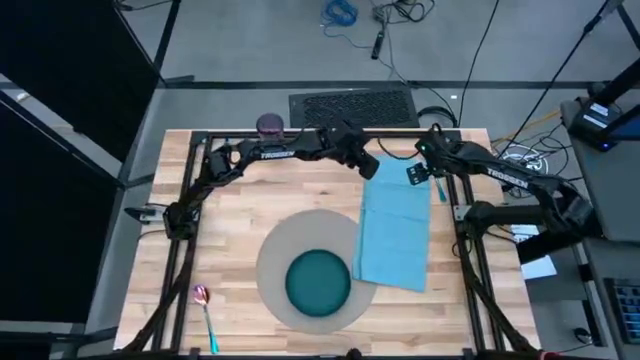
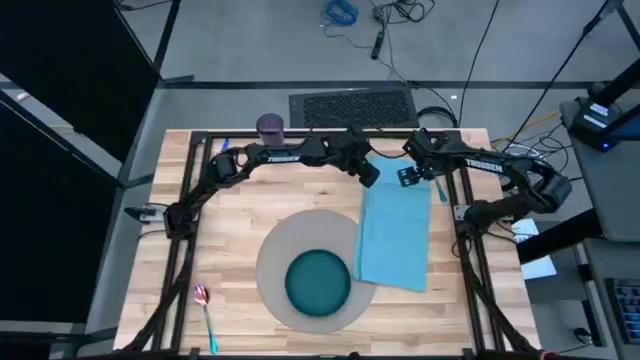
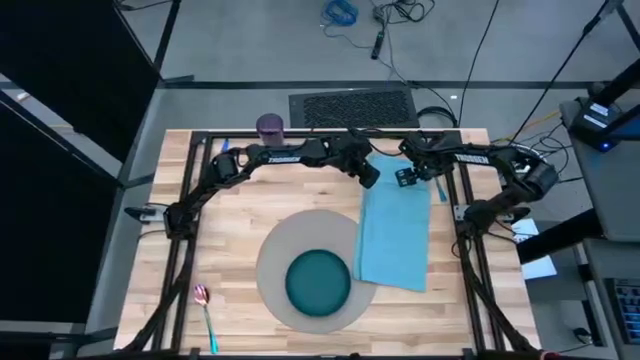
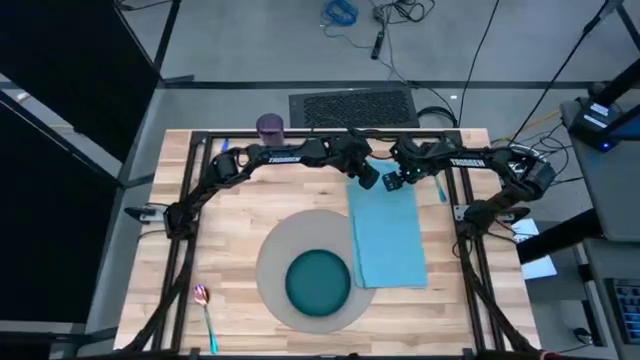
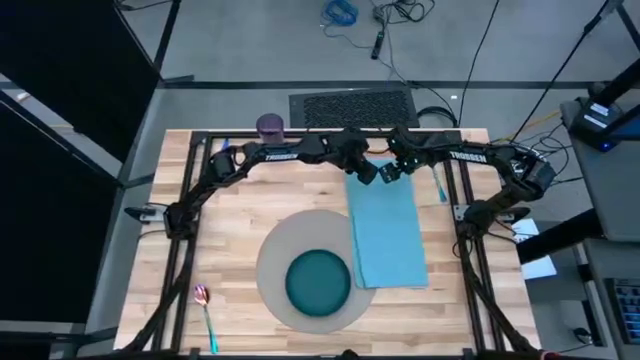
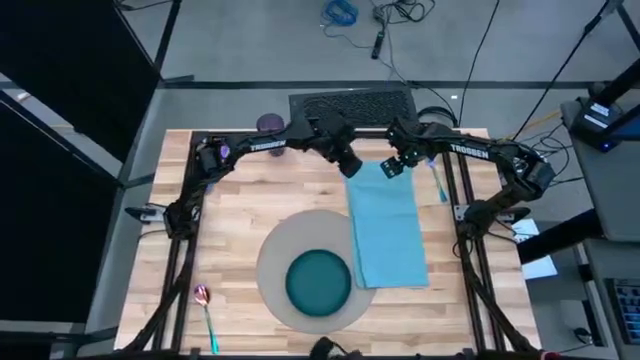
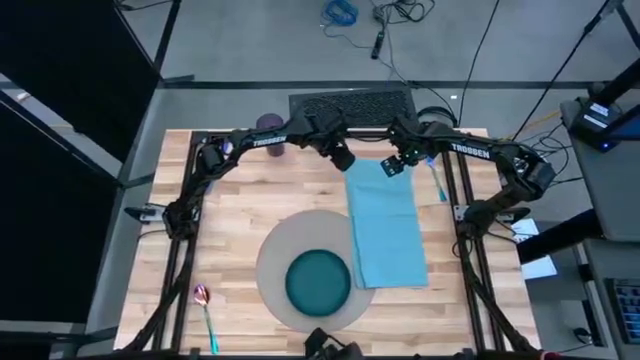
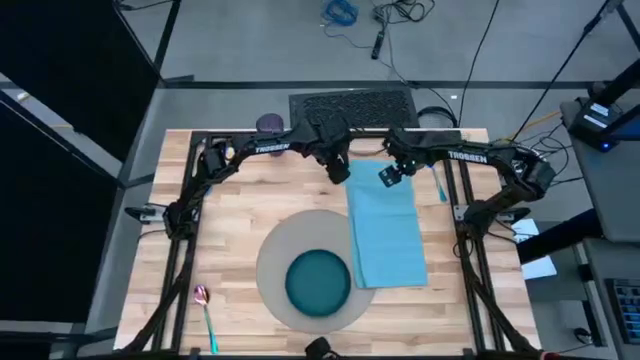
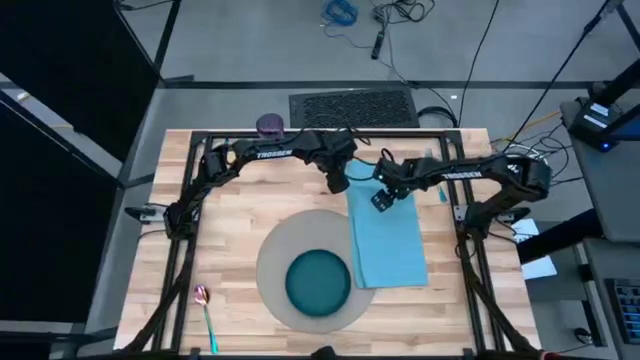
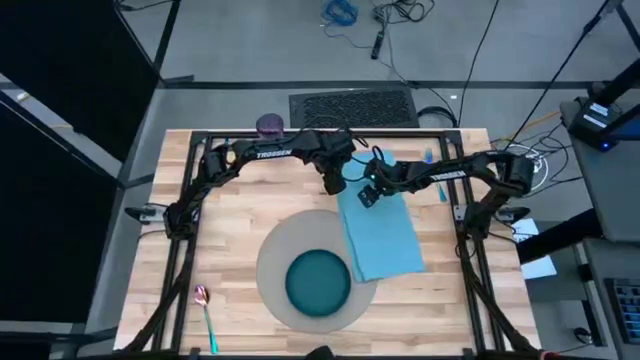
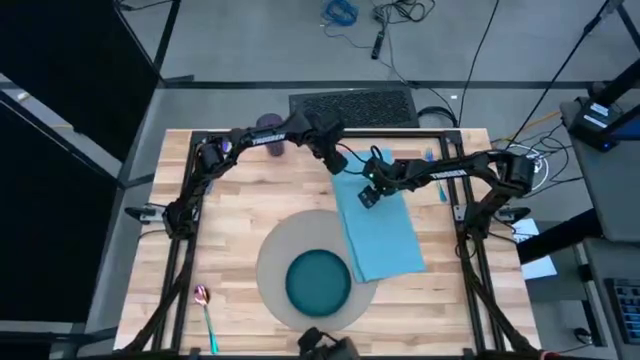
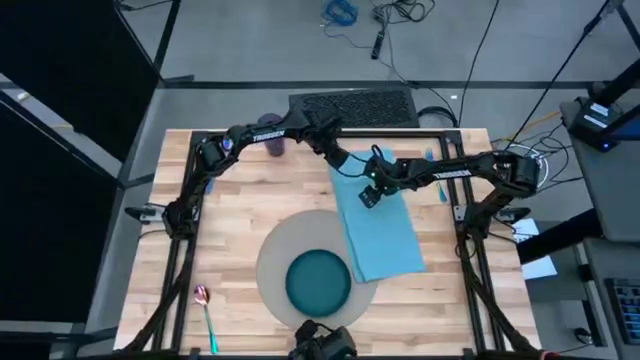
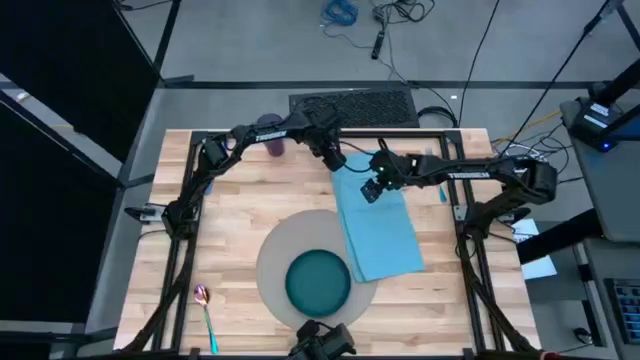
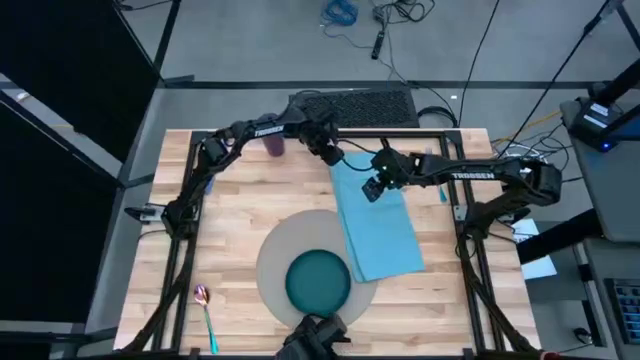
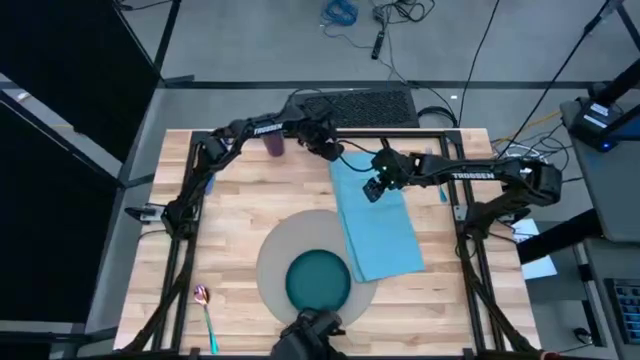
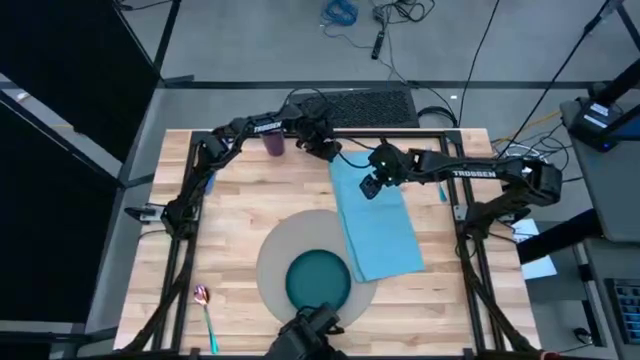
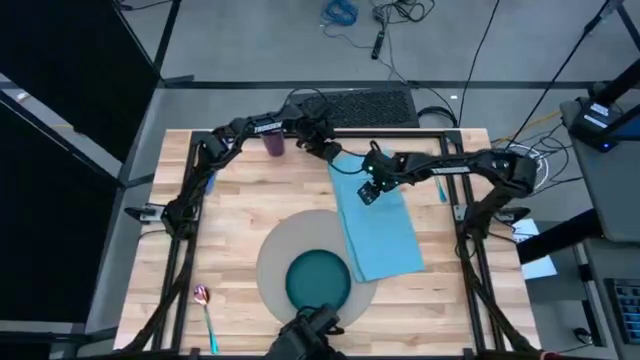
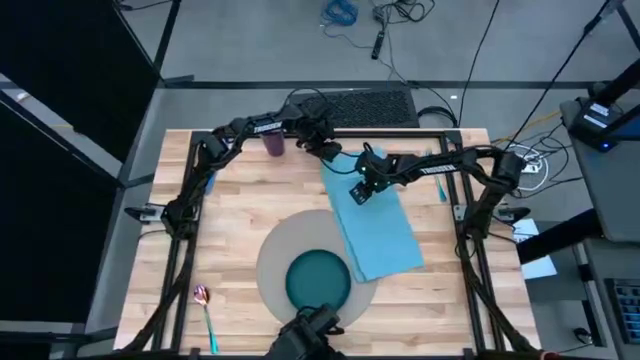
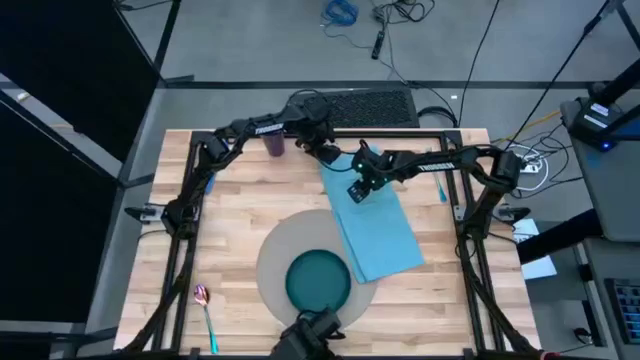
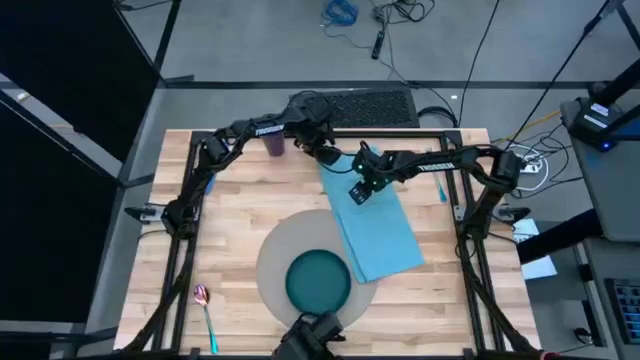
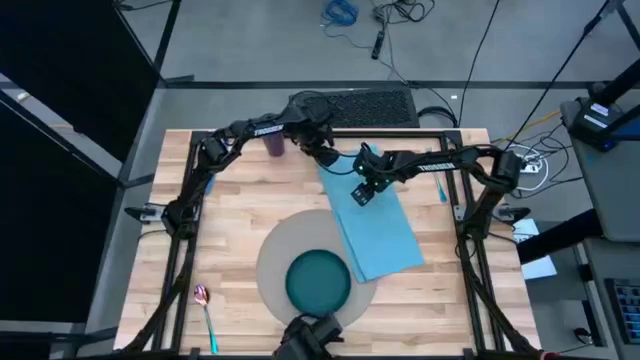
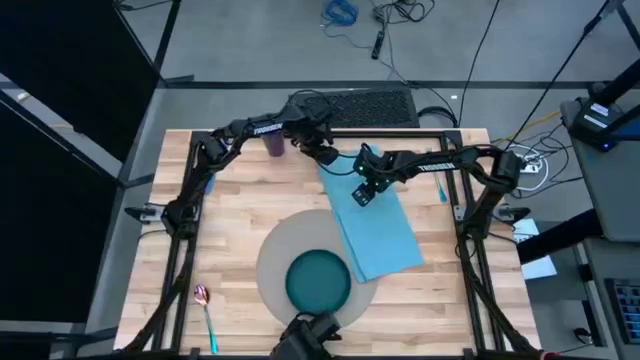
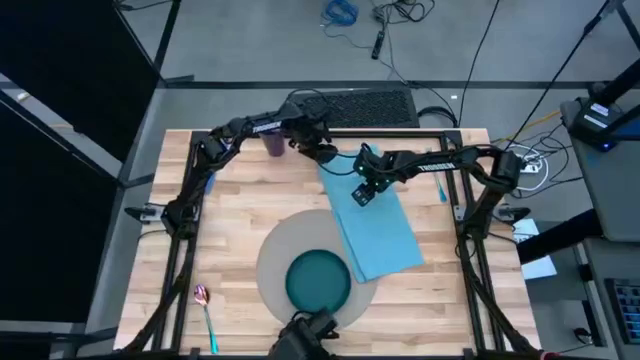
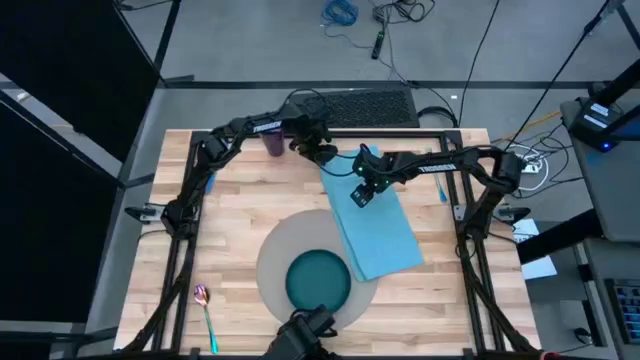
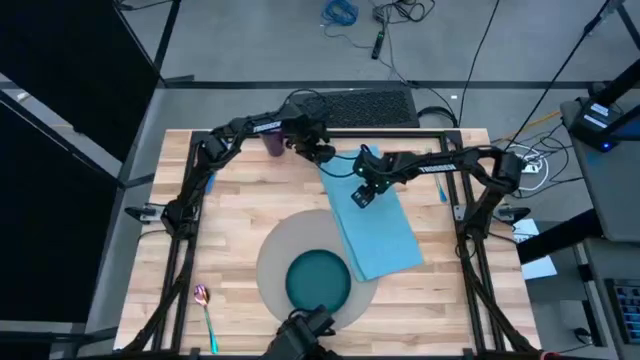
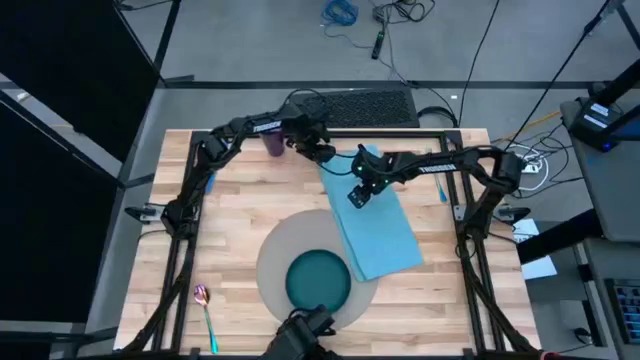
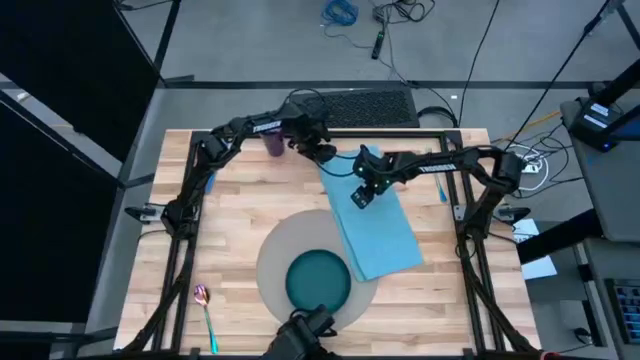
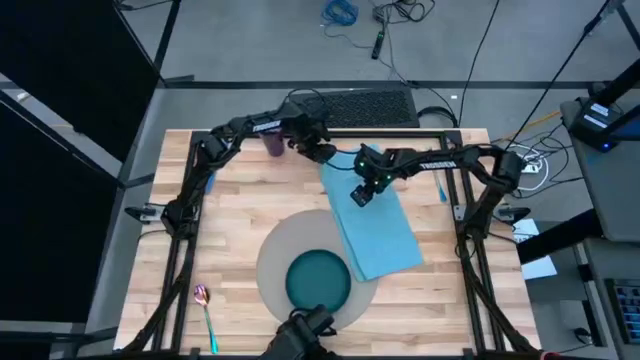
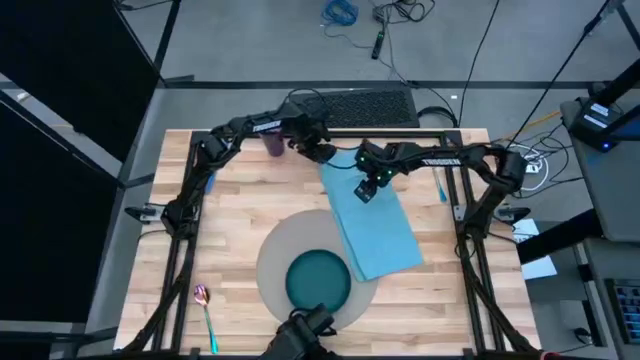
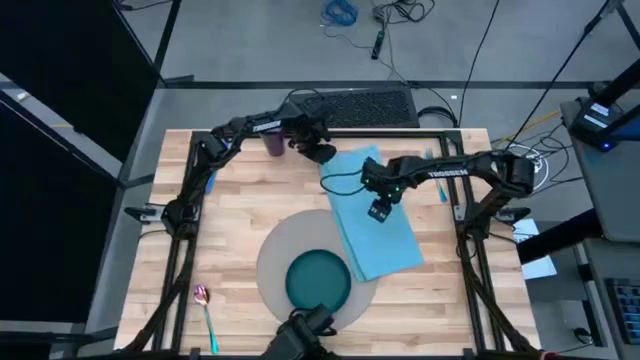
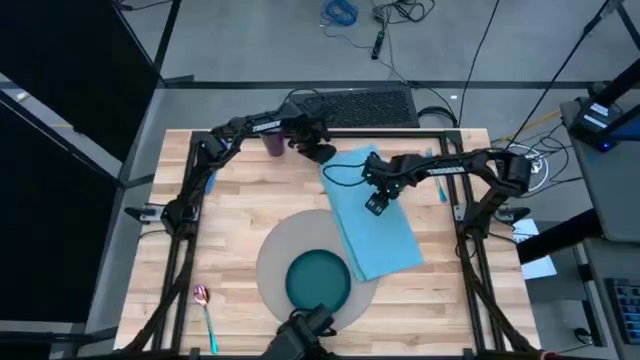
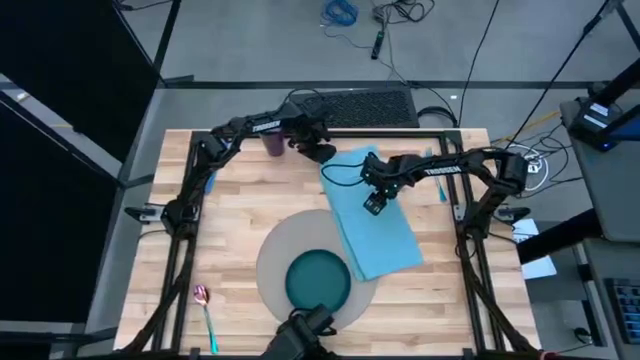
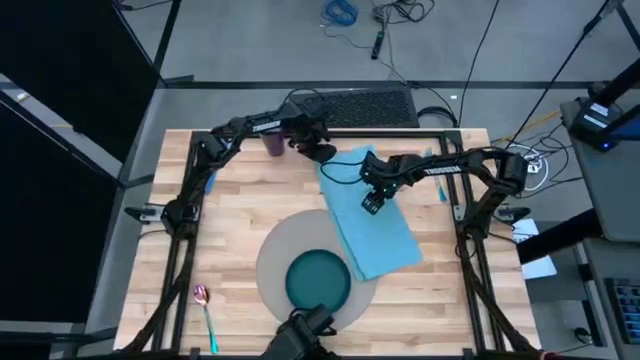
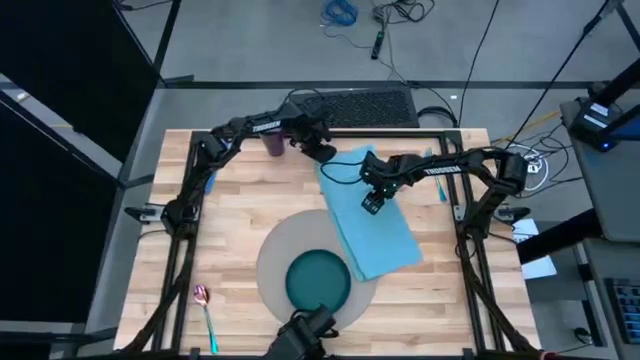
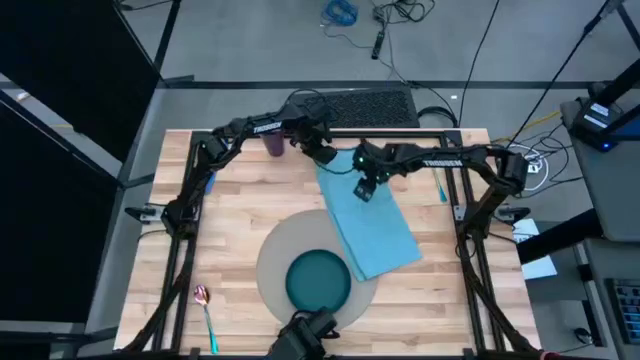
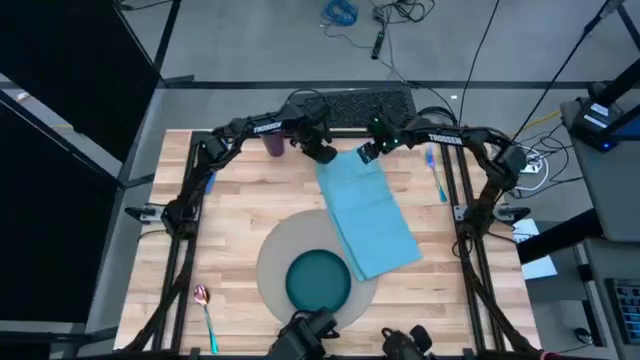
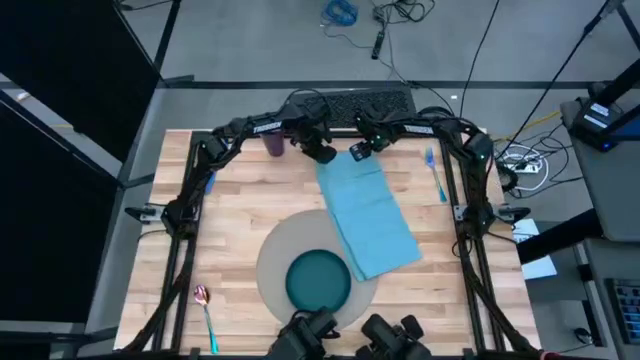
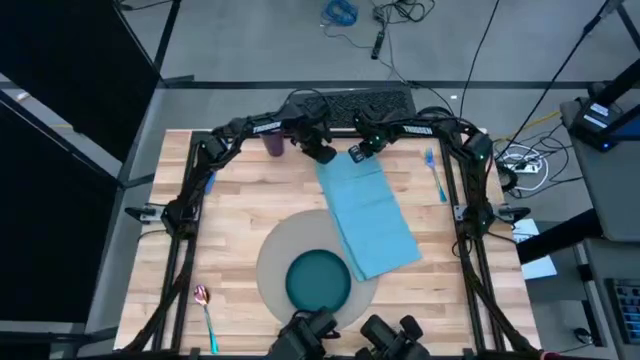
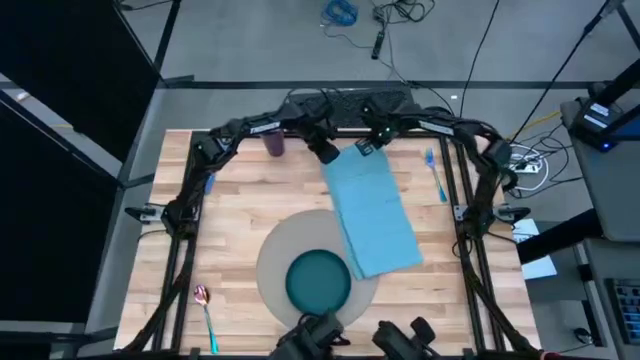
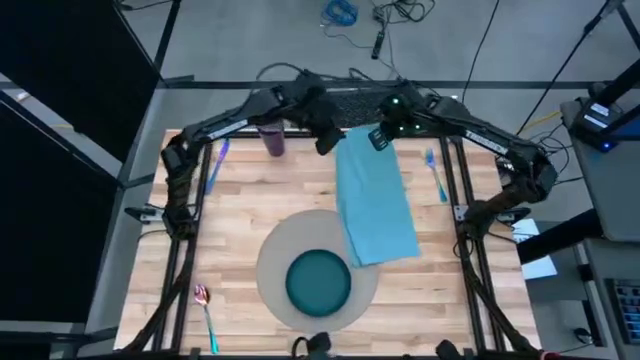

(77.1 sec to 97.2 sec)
Task: Set table place
Fold the blue table napkin
